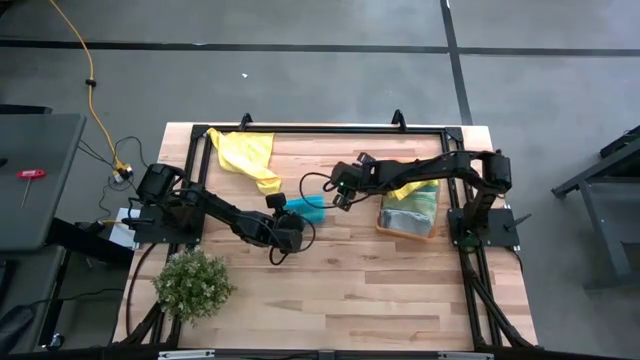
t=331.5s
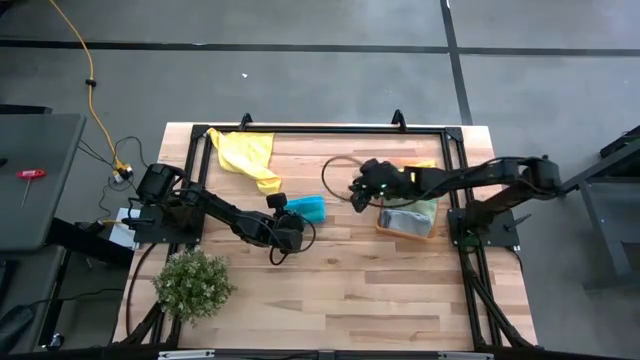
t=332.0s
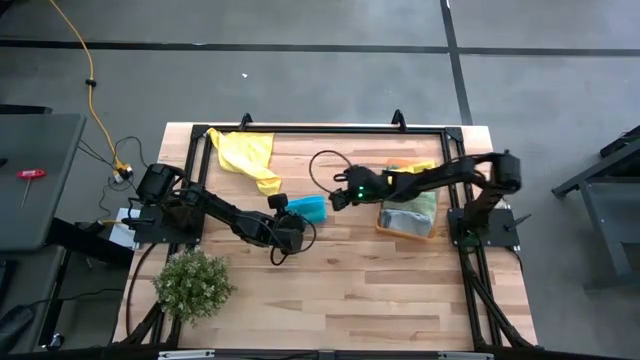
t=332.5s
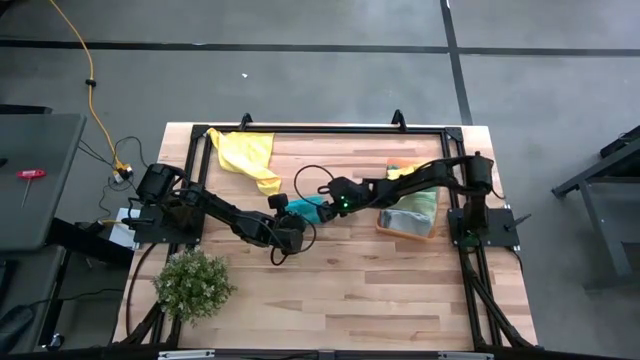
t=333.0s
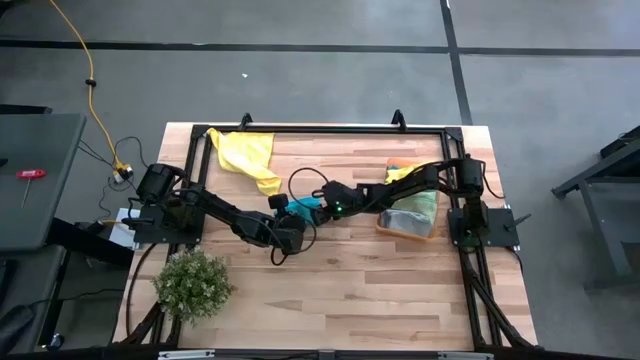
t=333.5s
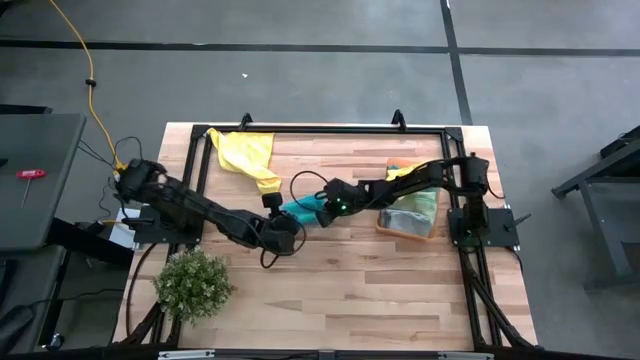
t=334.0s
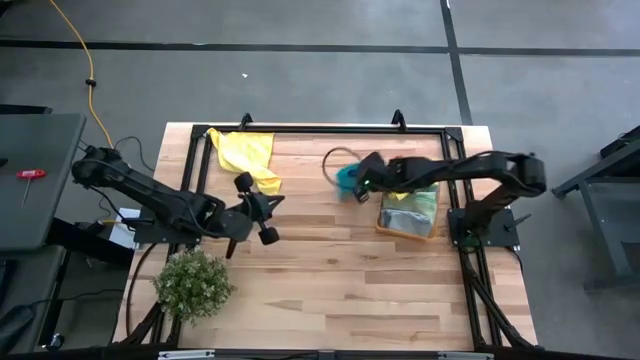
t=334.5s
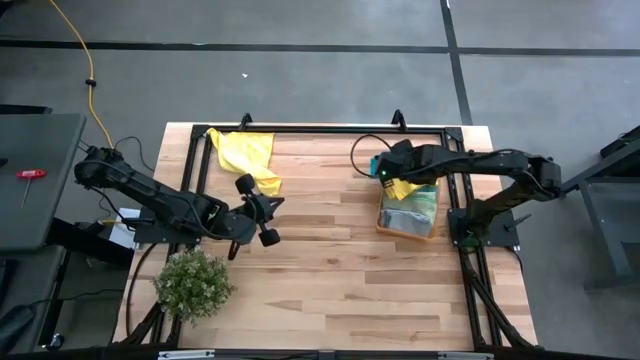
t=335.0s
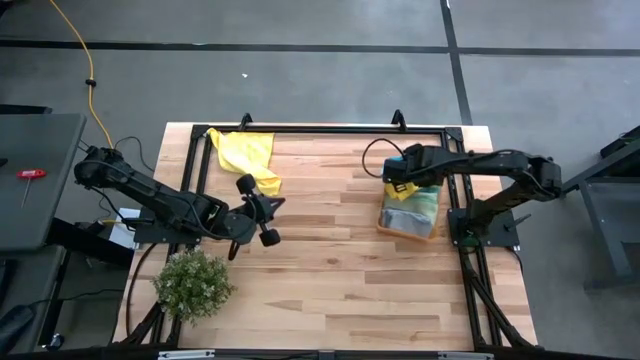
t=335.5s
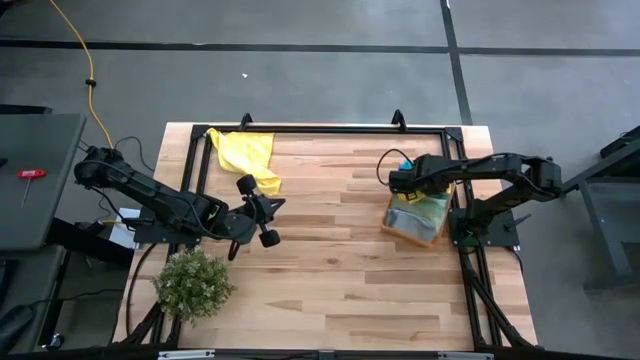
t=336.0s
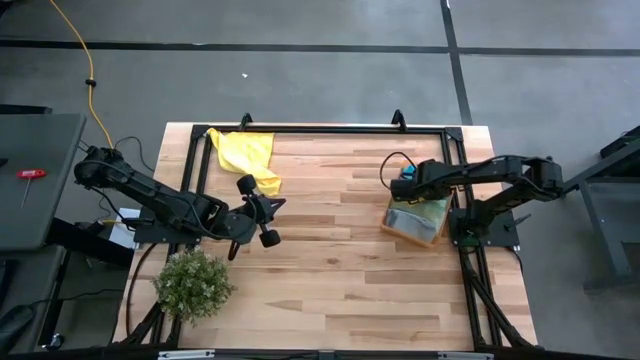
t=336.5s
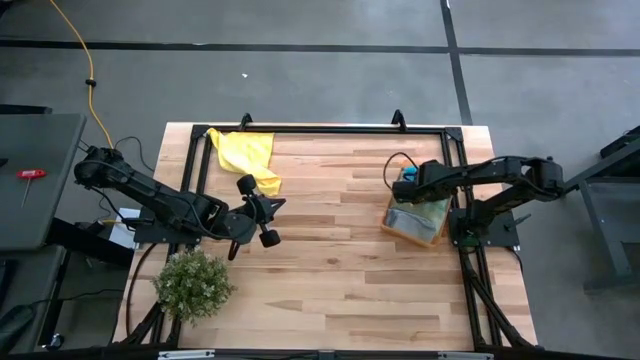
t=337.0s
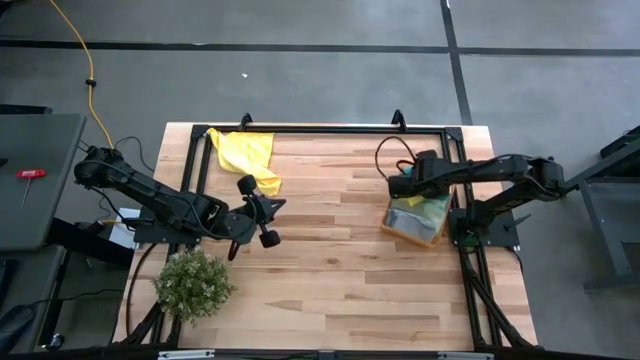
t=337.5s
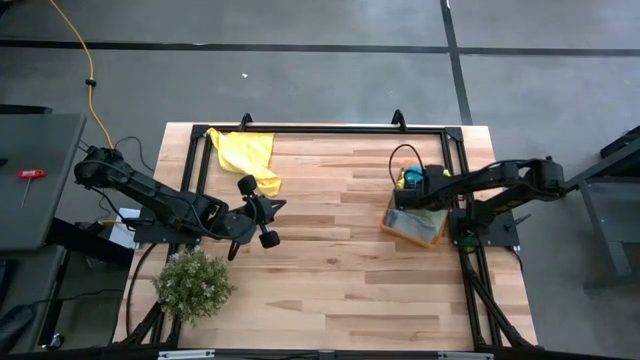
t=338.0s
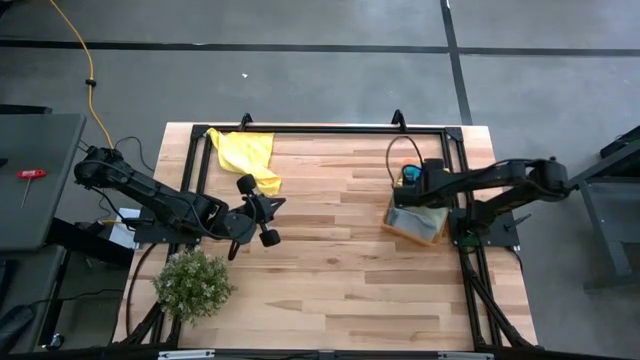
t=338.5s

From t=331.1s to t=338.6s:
Task: Fold microfiber towels
Put the folded blue microfiber cloth into the orange bin

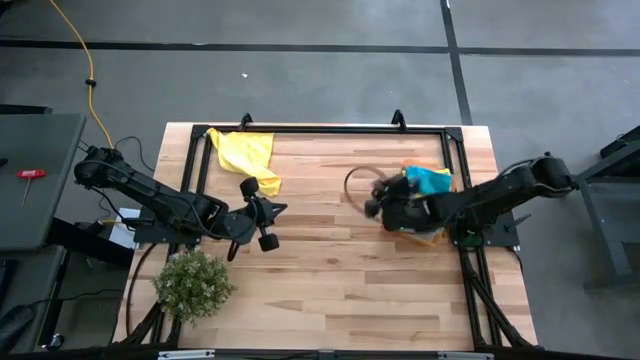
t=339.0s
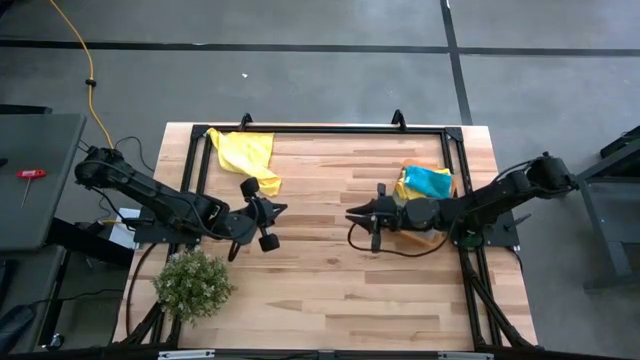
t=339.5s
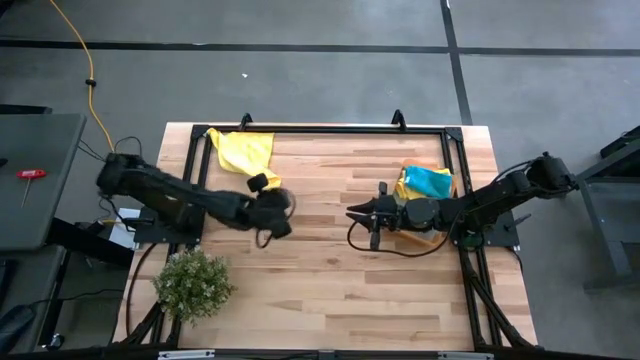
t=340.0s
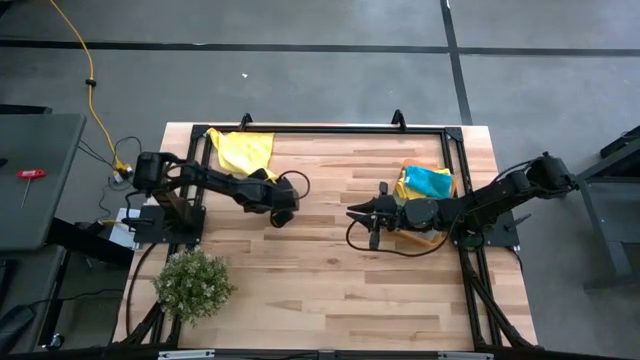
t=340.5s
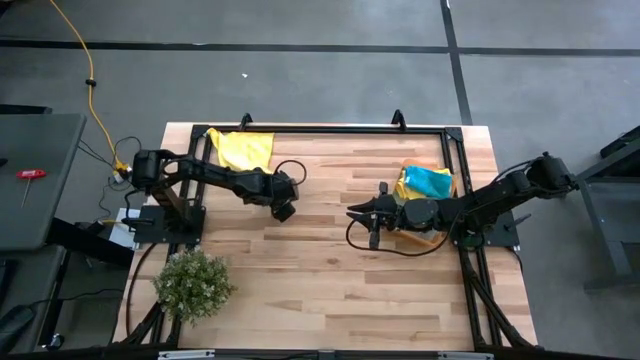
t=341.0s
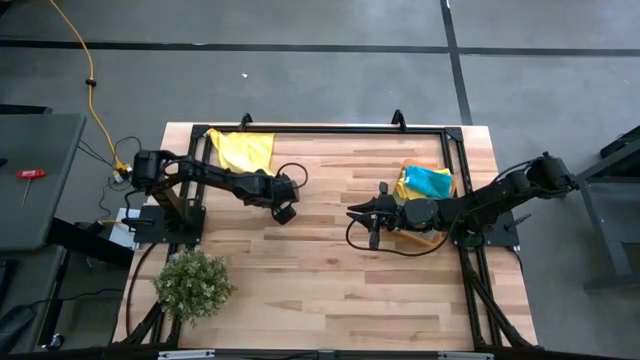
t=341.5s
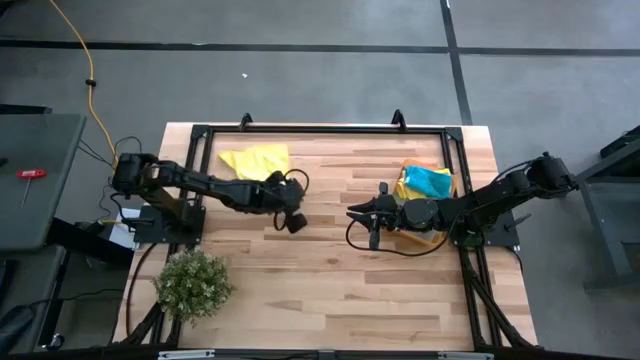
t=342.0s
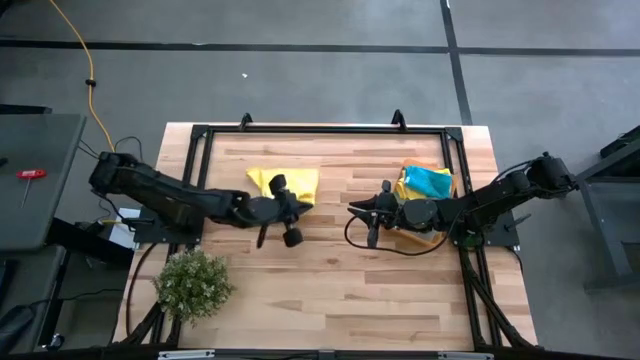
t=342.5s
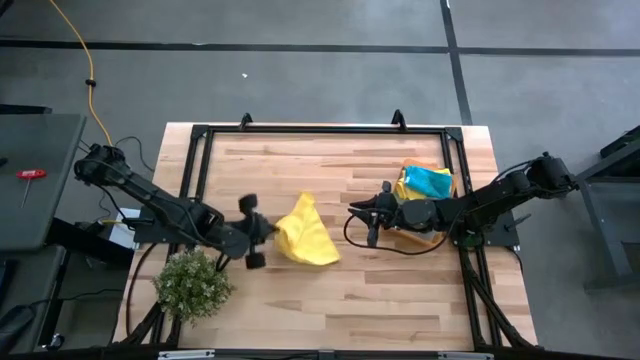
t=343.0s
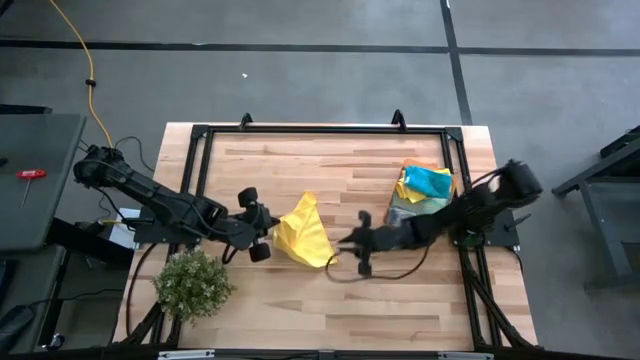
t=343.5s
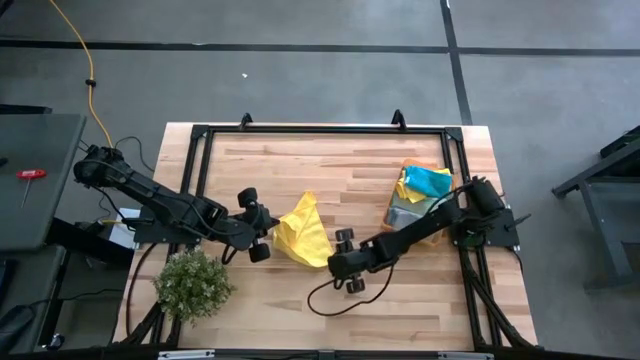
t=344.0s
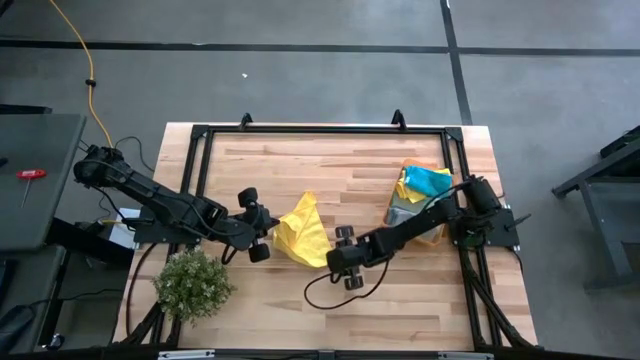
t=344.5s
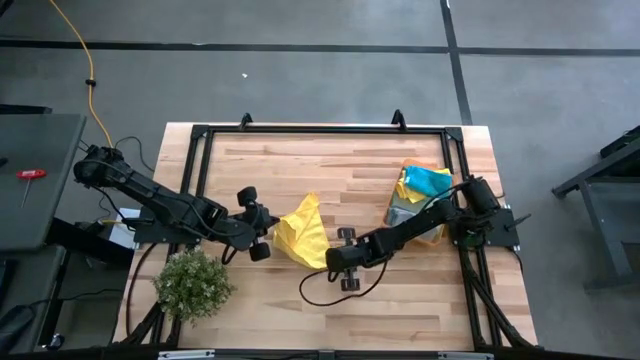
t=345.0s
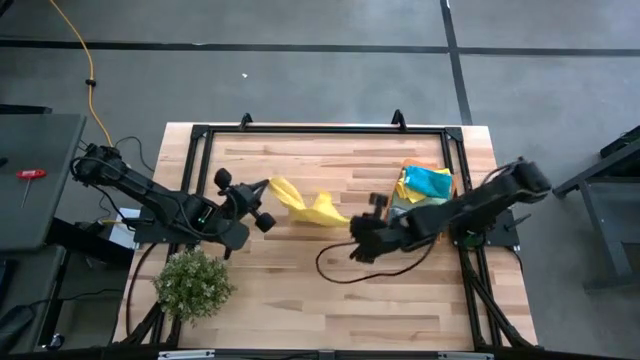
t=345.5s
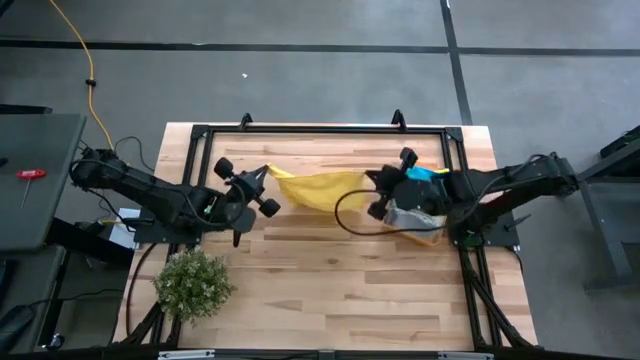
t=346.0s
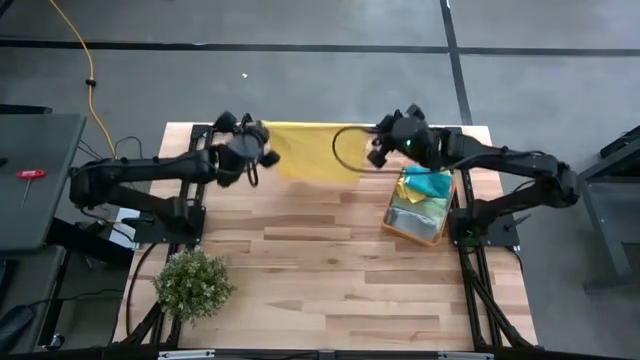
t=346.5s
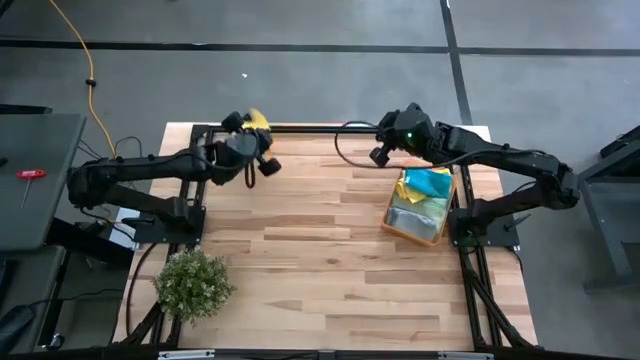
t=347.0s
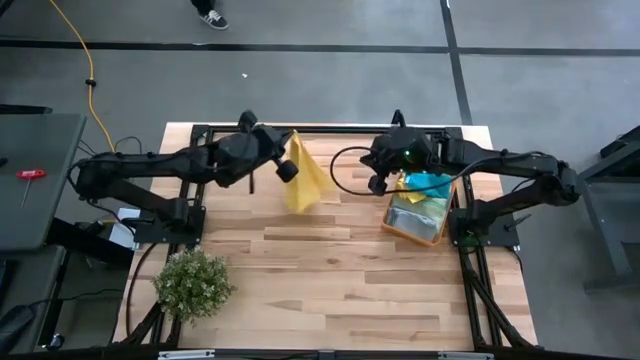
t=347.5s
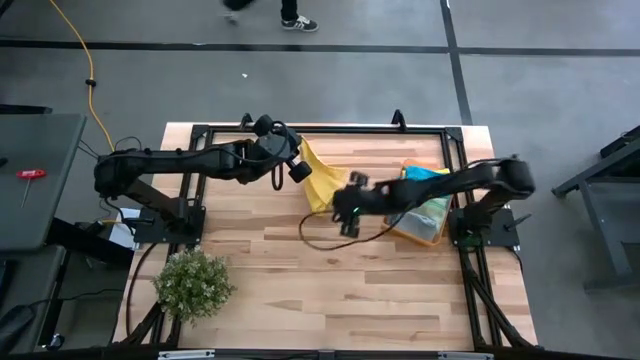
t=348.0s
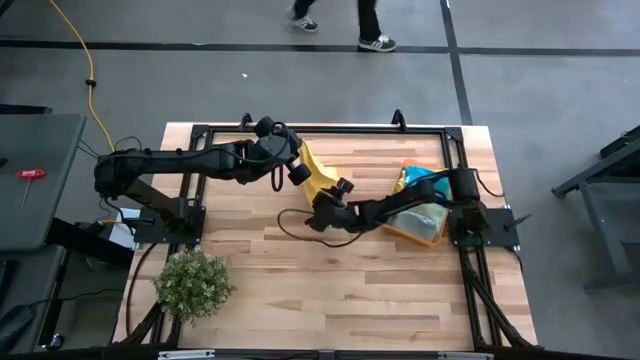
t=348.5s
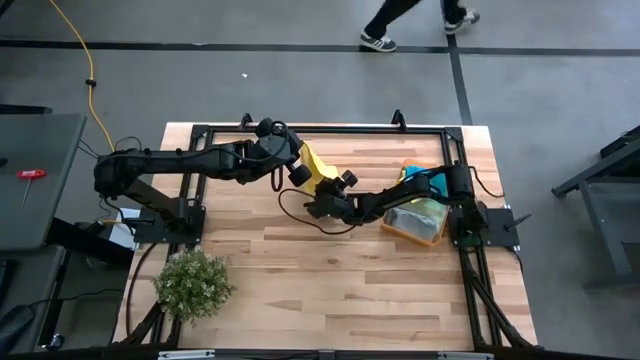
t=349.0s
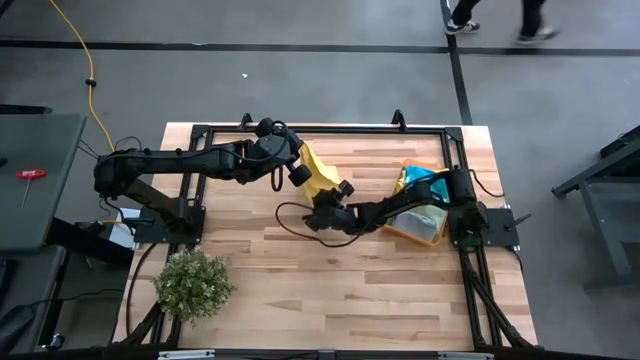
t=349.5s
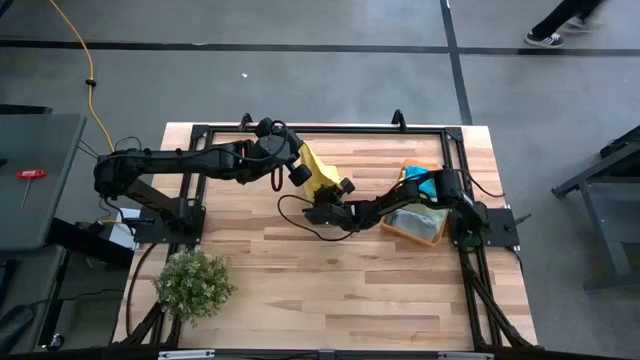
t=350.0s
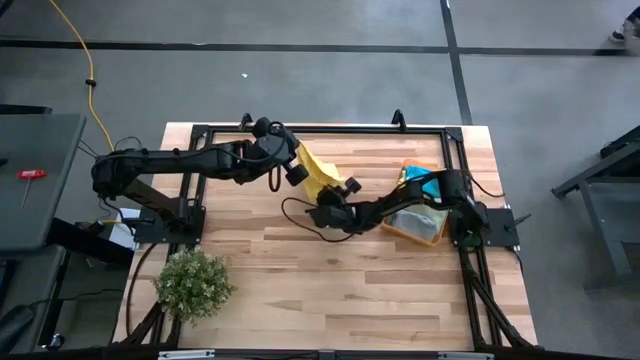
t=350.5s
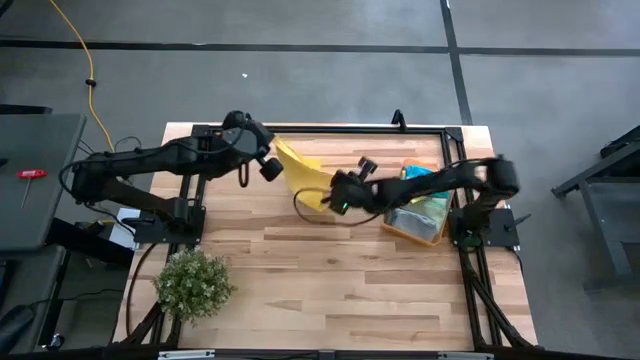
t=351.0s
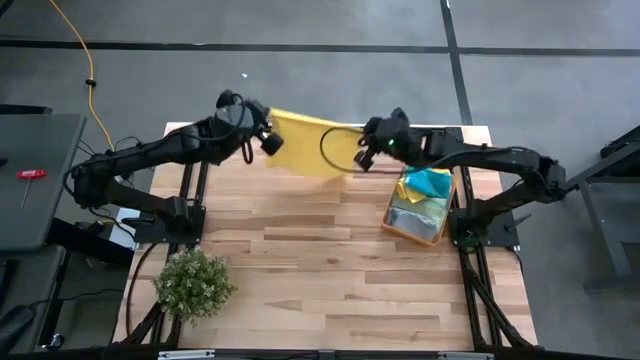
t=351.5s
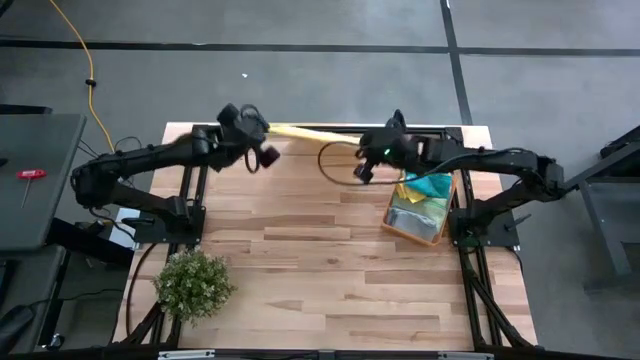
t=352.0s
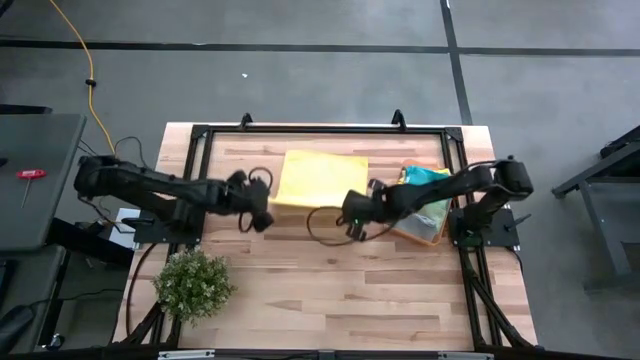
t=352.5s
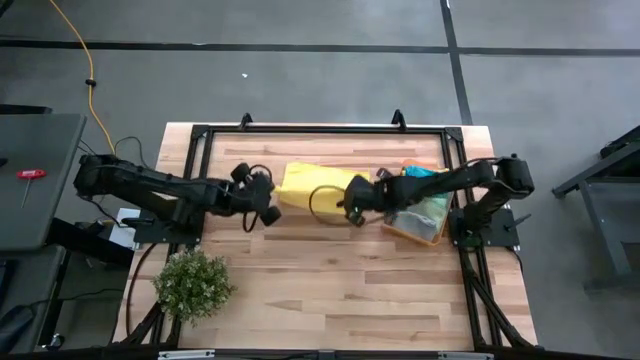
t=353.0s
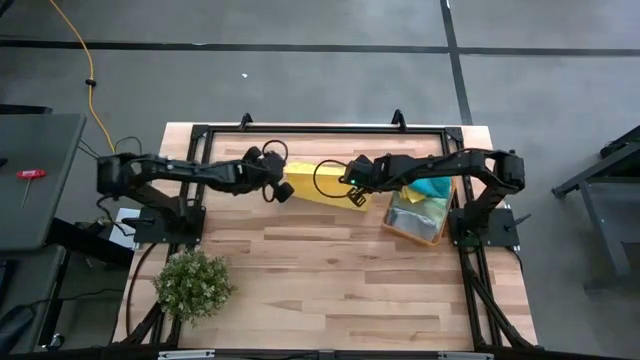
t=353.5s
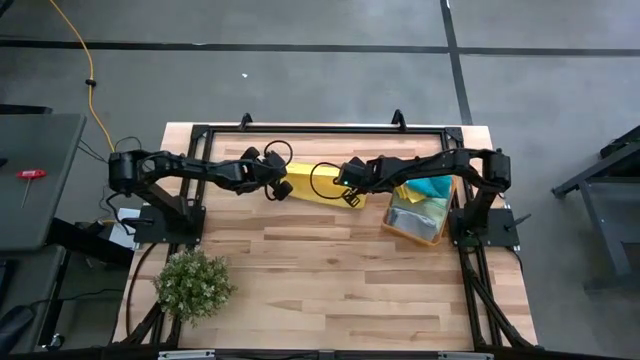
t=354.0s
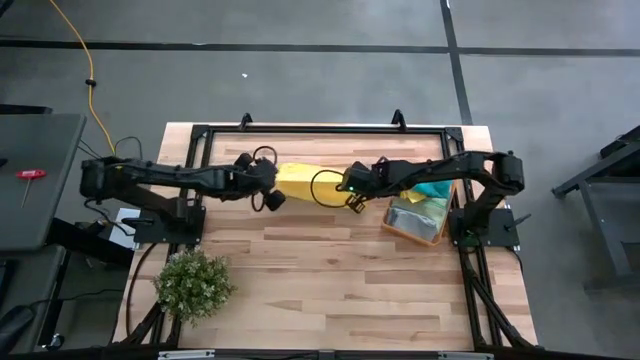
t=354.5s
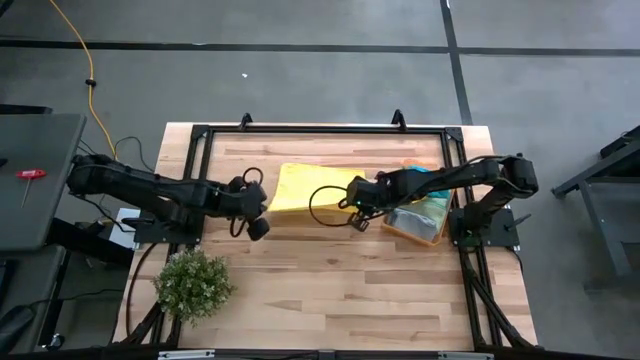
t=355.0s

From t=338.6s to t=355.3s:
Fold the yellow microfiber cloth
